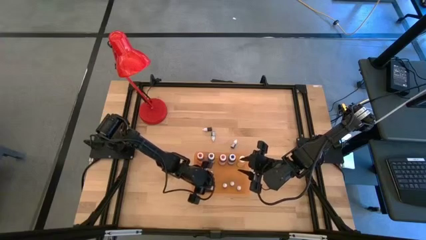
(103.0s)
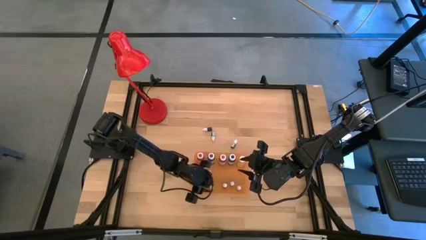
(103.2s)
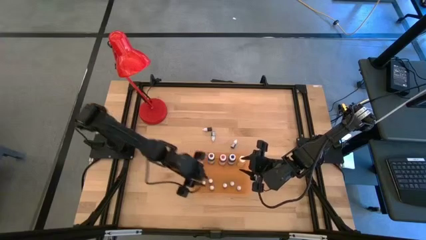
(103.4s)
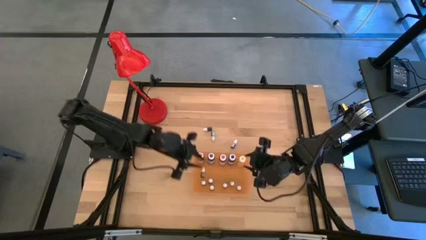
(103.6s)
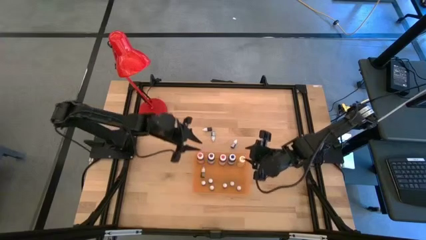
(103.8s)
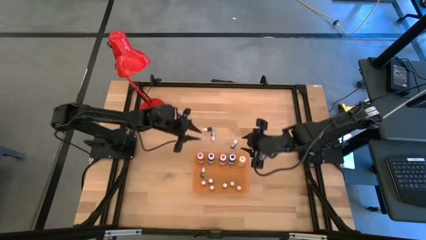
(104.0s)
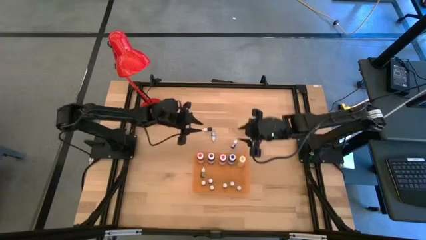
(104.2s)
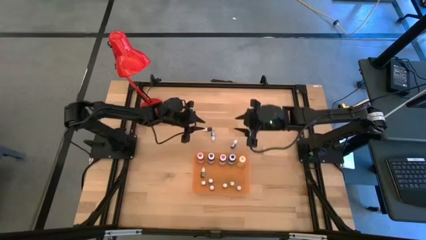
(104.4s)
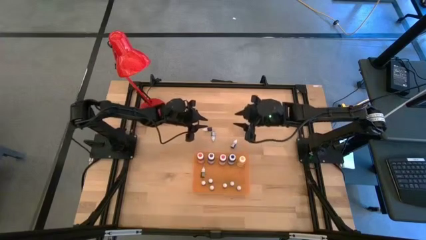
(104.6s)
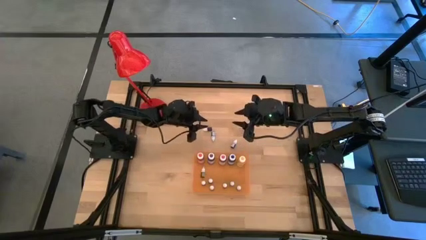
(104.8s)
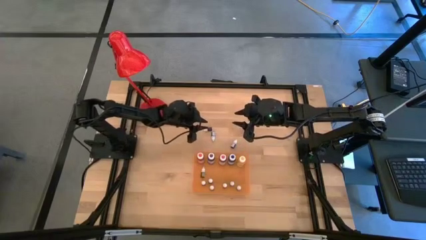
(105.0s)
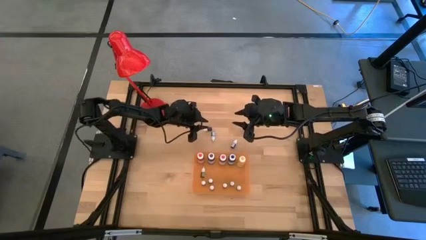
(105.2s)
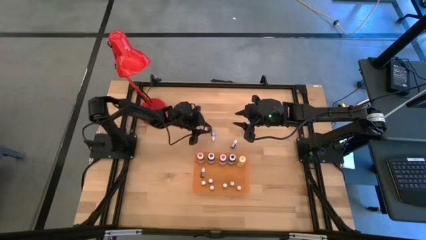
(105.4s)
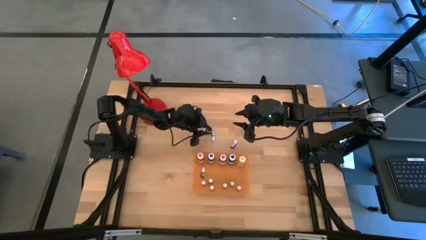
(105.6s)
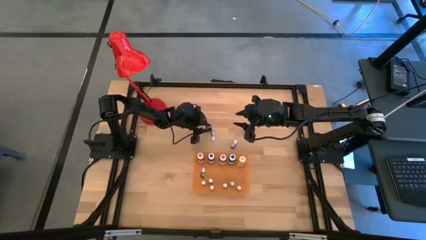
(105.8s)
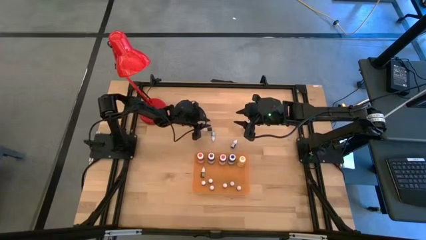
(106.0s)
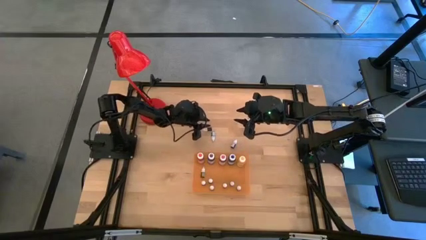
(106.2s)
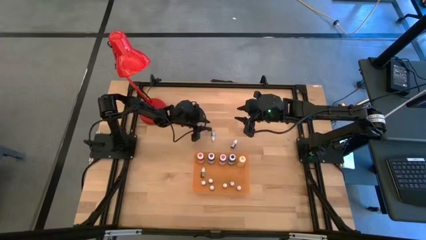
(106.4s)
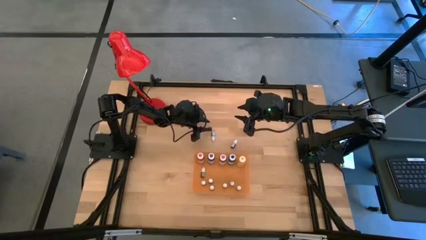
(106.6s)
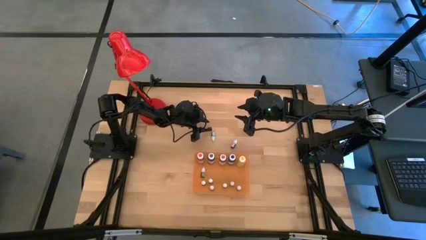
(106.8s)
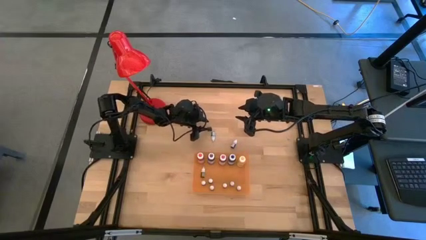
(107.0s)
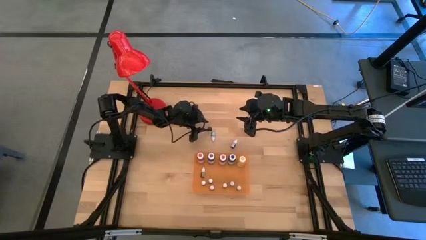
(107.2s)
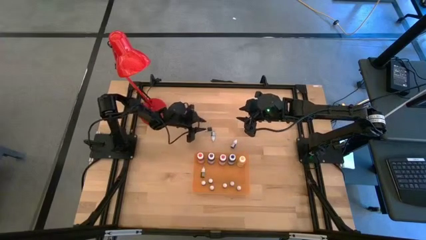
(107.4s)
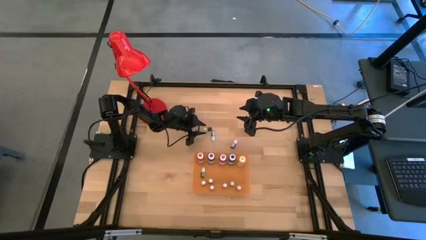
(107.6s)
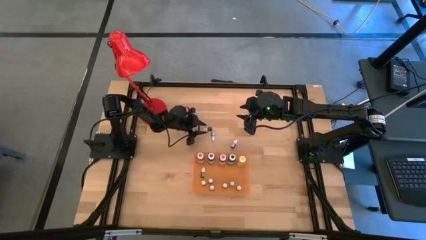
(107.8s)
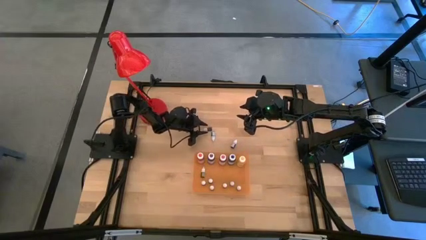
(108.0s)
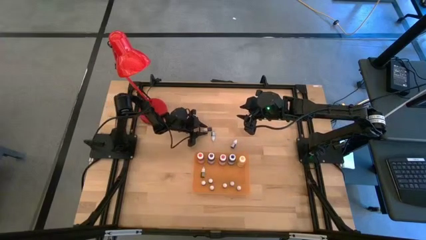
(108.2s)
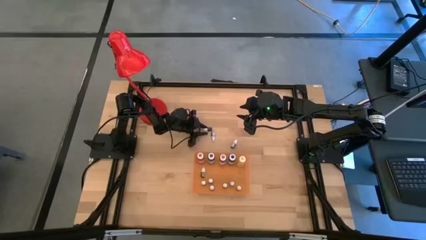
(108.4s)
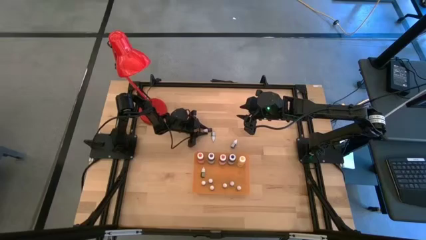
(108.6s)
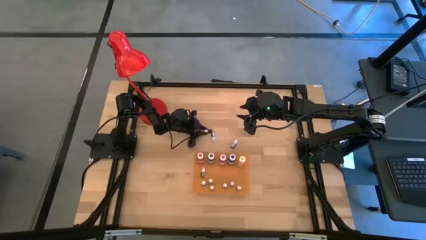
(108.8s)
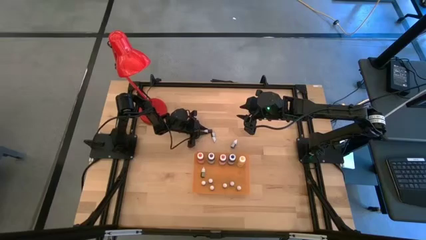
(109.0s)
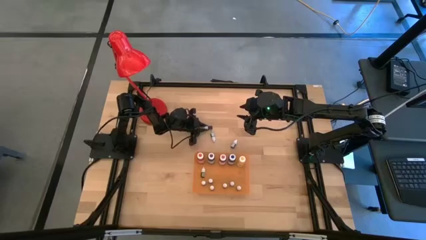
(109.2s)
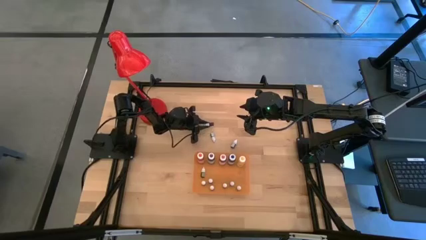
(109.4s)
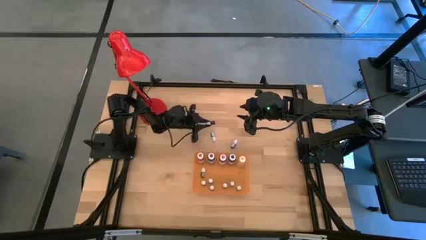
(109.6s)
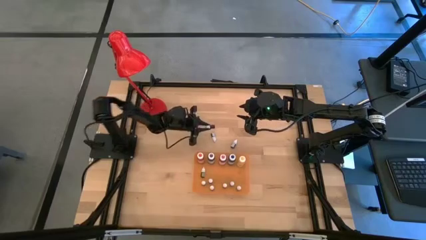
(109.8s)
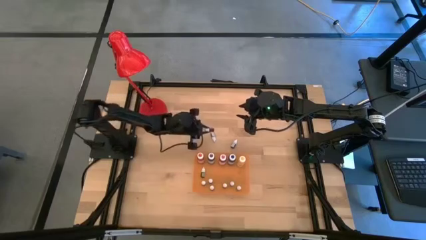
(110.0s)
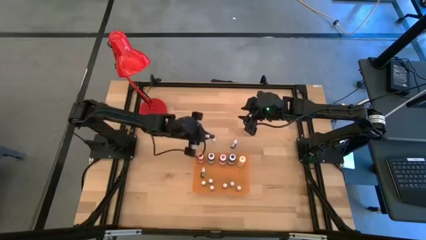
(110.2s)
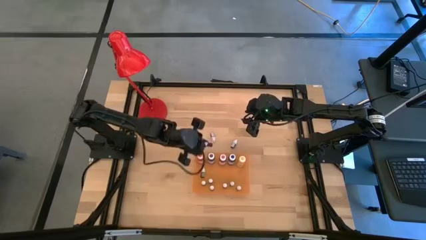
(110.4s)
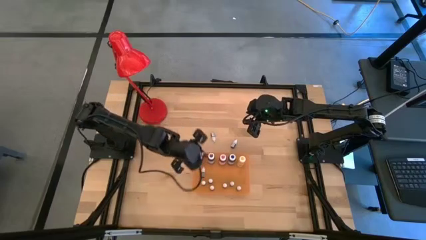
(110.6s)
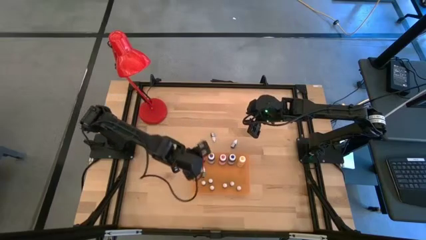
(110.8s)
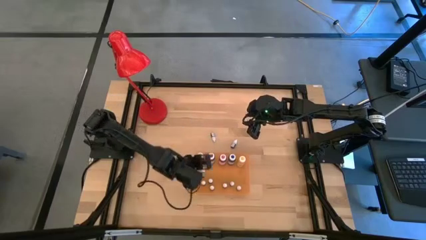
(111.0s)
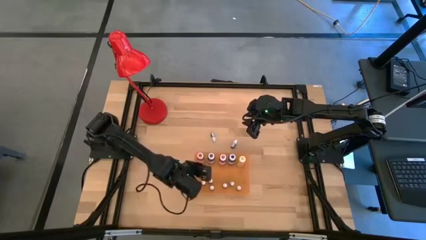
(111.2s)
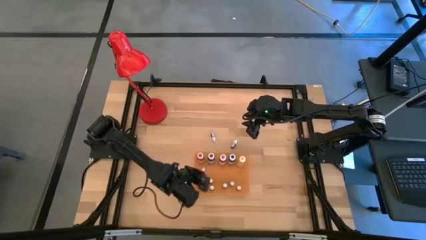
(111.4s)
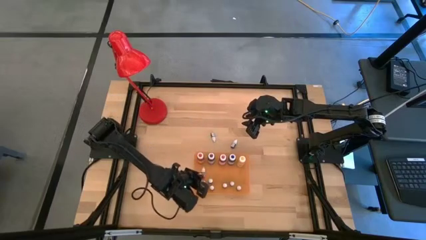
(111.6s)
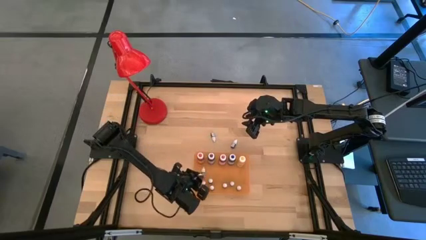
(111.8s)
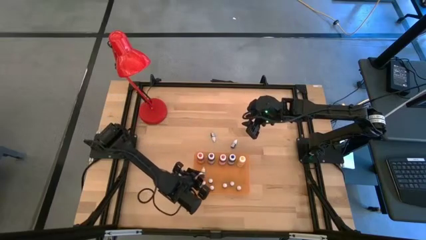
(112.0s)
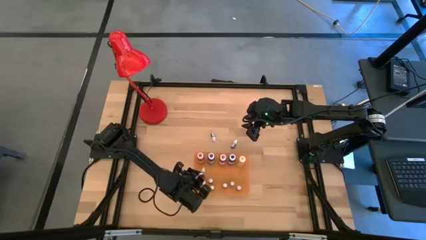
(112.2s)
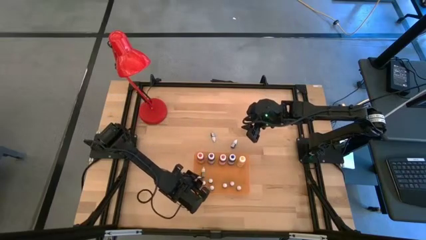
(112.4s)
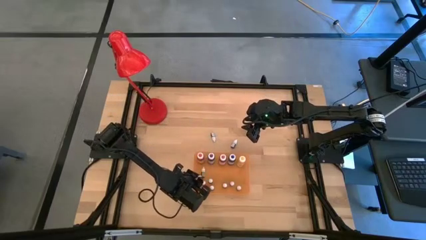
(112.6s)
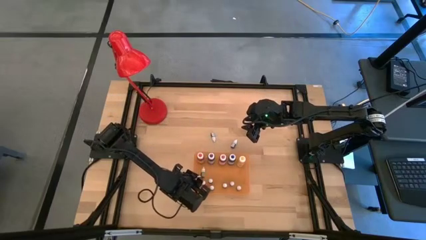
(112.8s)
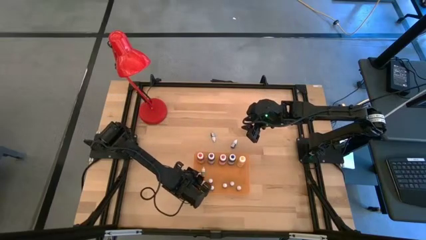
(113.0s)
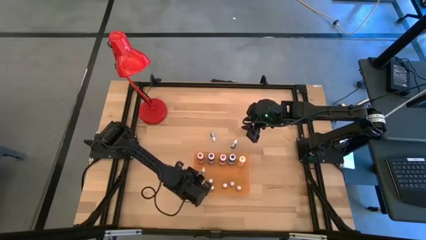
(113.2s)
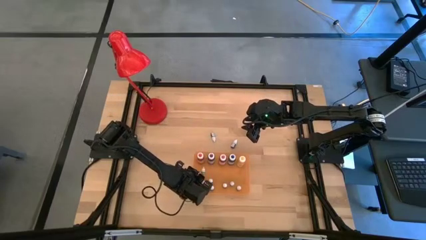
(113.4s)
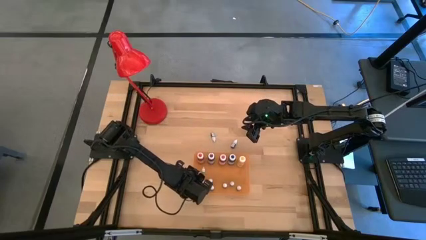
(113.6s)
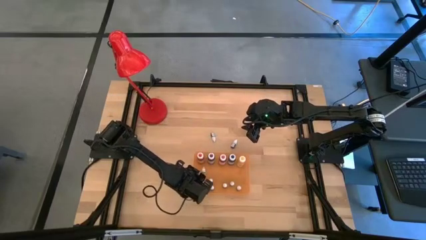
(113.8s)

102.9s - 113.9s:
Task: Pick & Place food coloring
Put the small red food coloring bottle into the orange bin

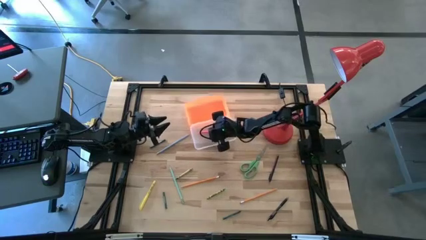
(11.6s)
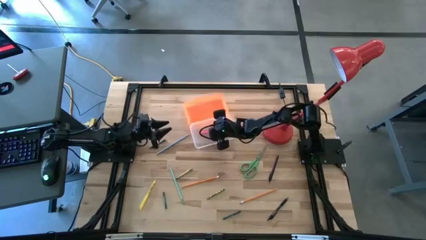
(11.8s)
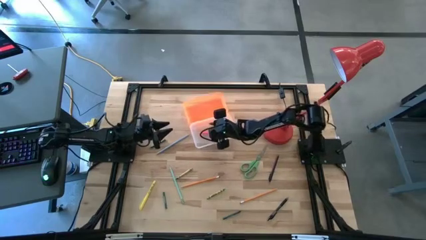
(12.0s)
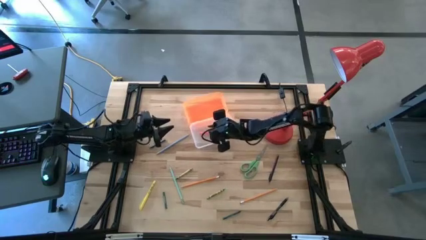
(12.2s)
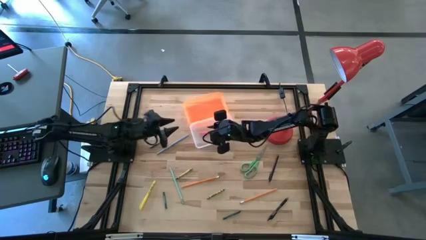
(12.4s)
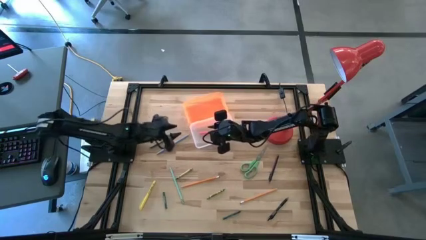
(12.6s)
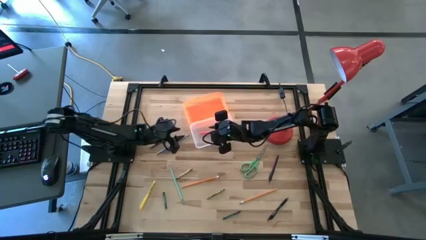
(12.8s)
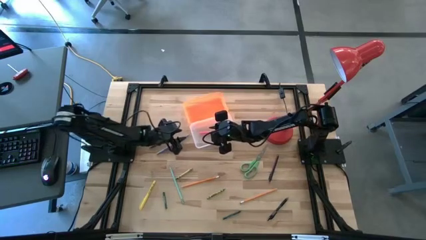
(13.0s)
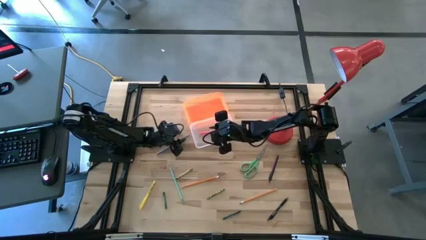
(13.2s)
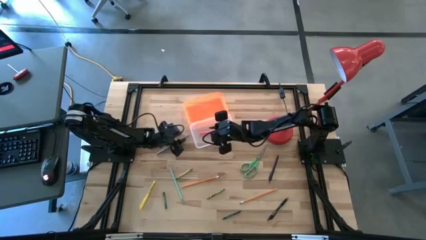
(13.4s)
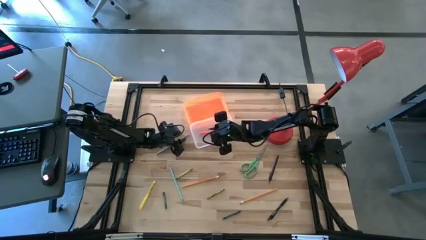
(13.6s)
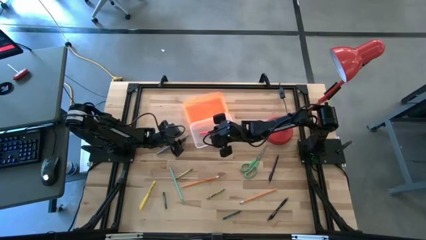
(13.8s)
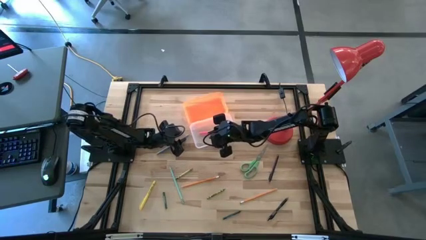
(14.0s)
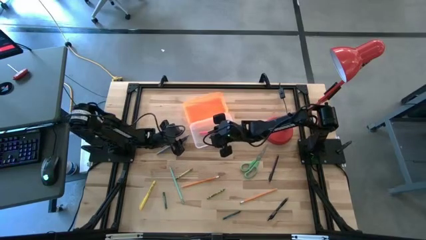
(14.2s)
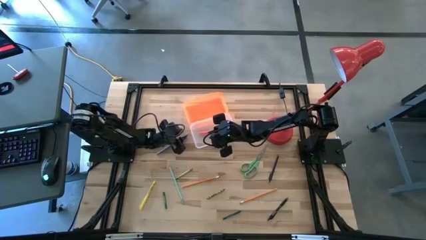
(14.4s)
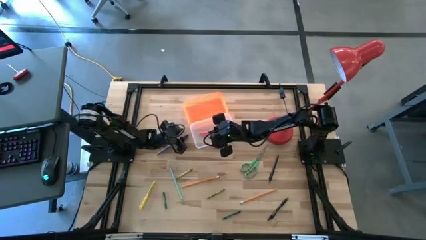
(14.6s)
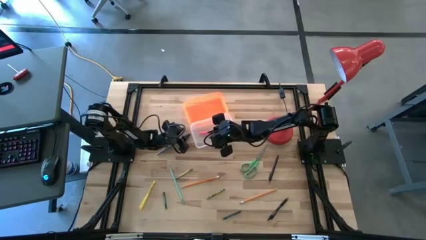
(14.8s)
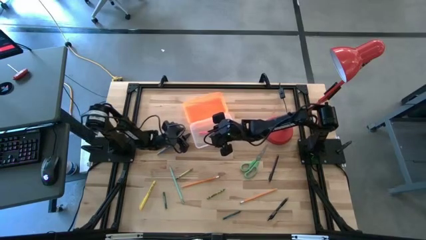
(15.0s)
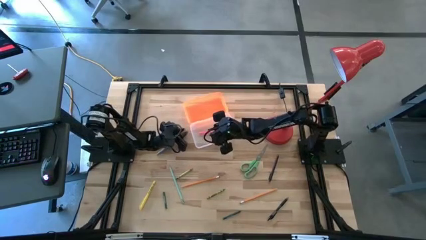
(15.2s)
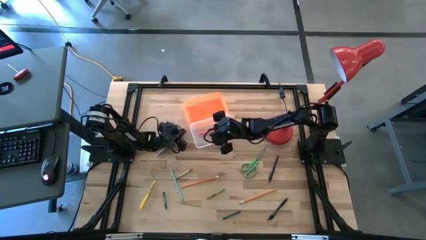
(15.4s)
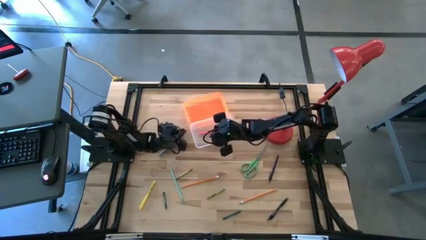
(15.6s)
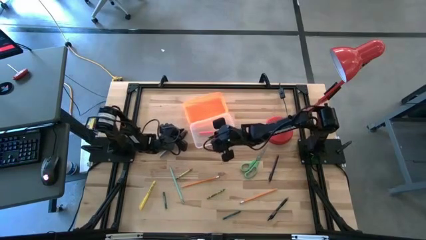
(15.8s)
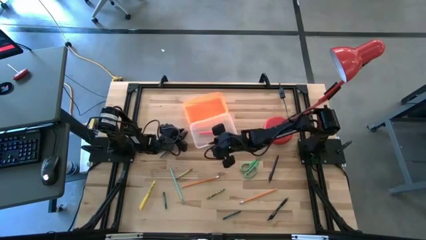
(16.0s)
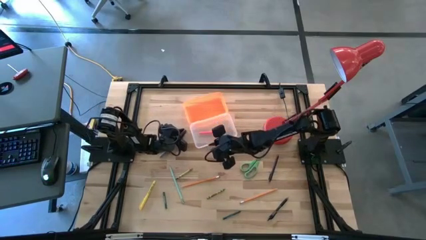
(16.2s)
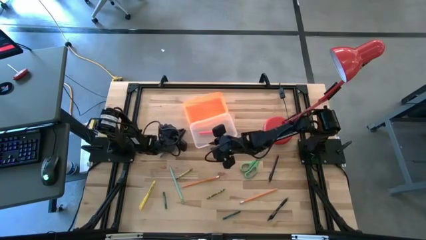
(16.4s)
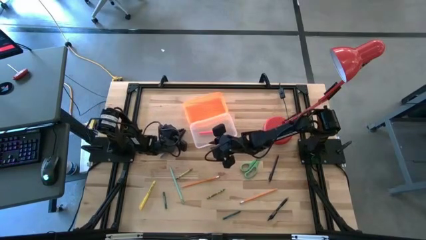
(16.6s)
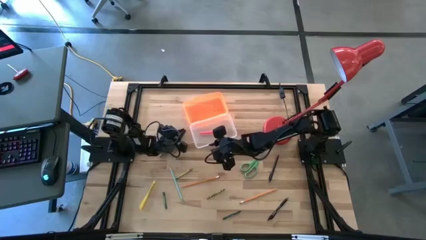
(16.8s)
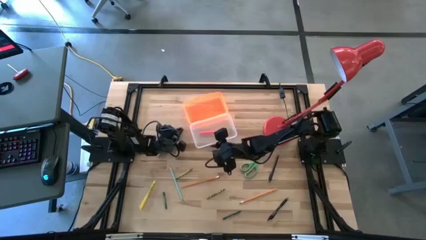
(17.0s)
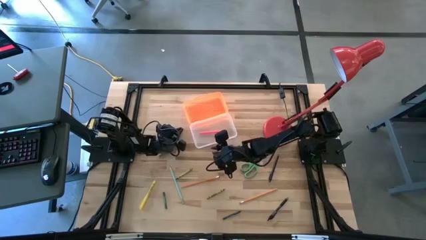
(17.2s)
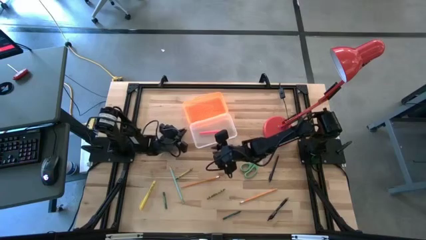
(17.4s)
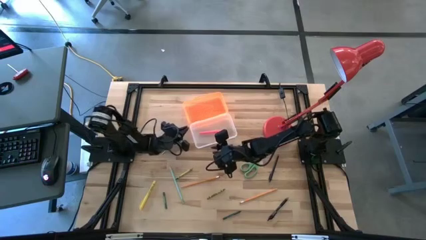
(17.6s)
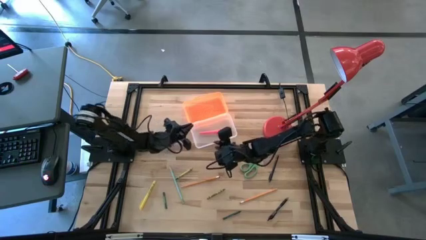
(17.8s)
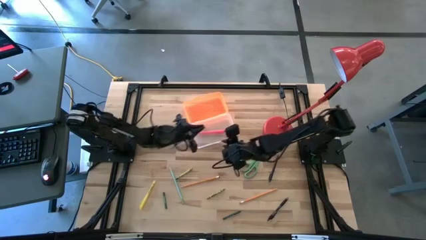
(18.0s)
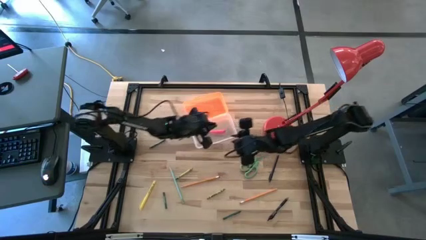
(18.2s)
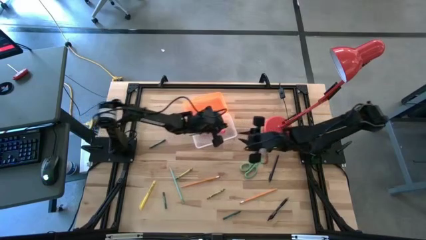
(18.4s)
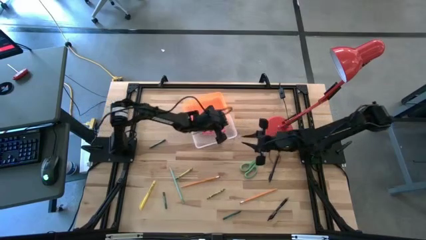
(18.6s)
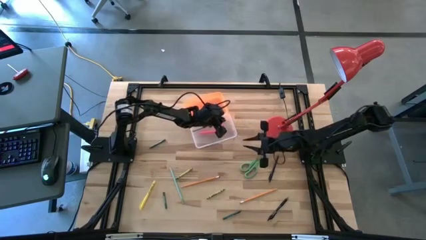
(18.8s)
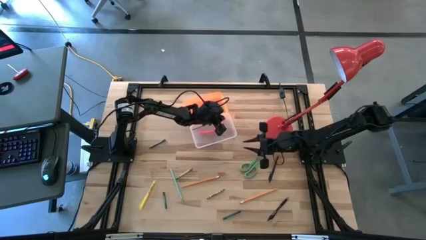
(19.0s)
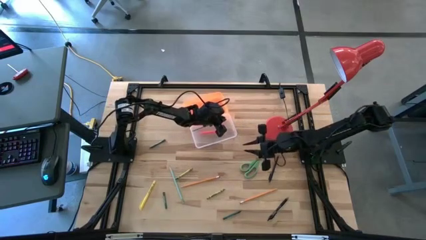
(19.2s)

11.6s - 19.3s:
Task: Pick & place school supplies into a supply box
Put the blue pencil into the orange supply box
